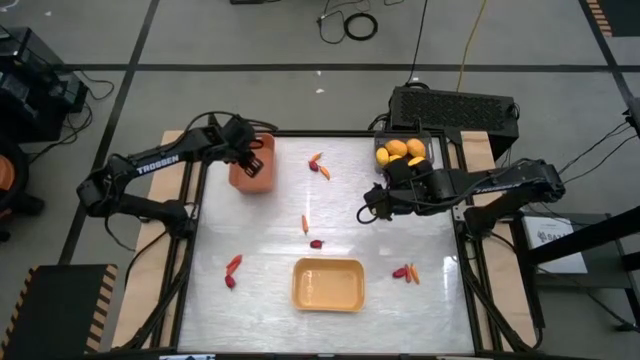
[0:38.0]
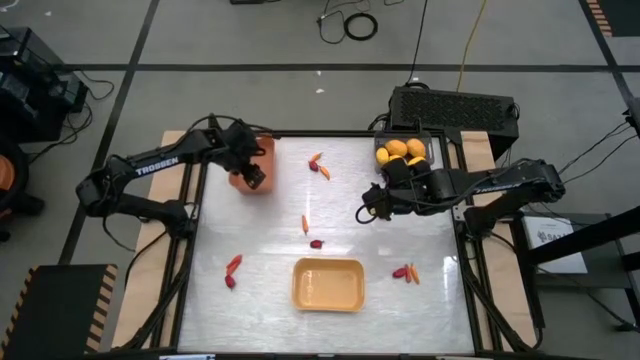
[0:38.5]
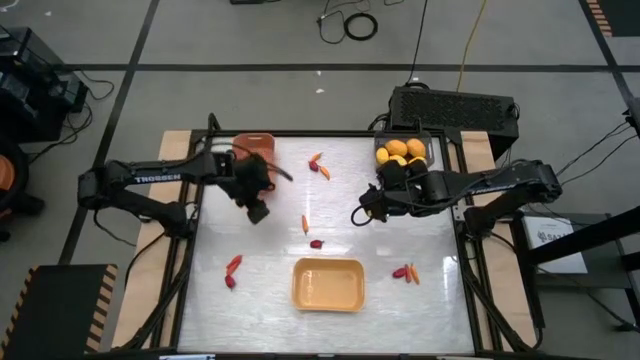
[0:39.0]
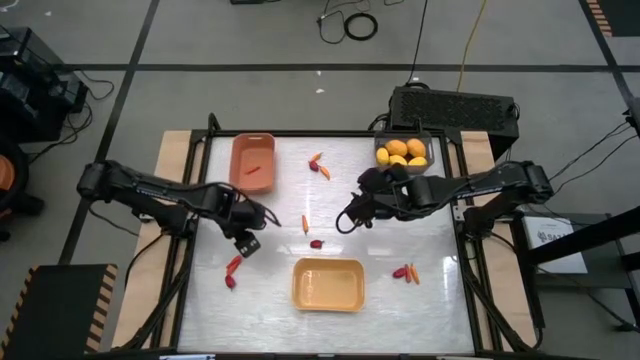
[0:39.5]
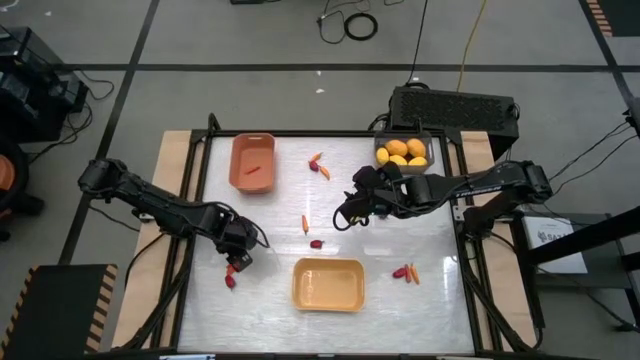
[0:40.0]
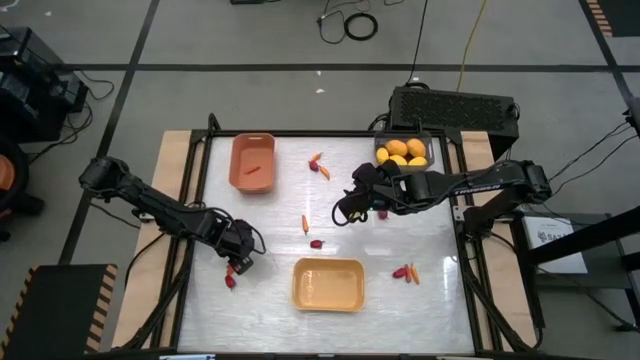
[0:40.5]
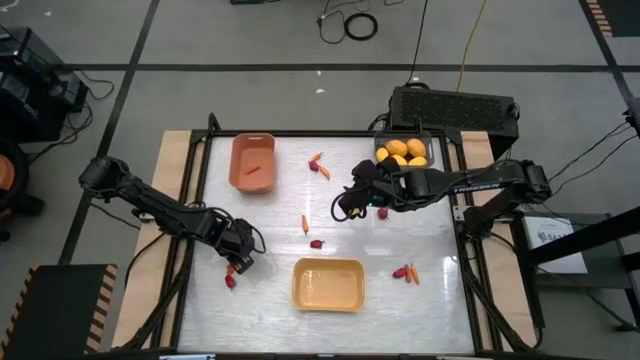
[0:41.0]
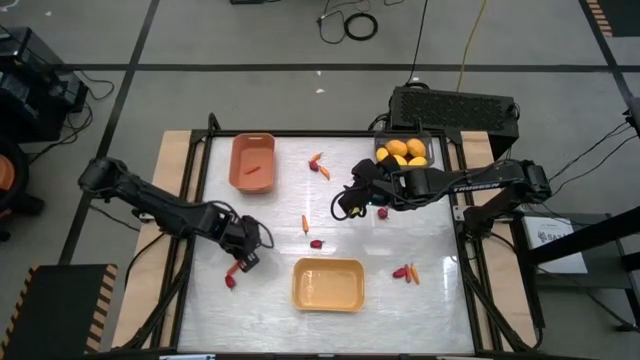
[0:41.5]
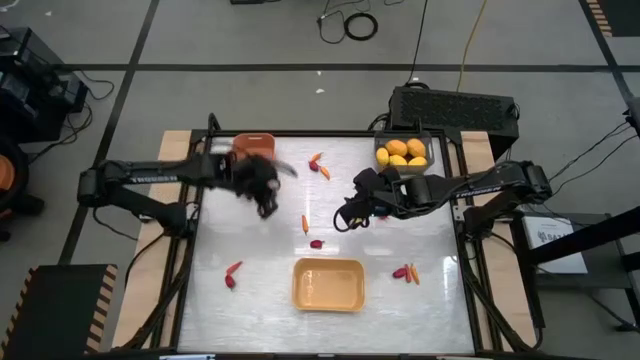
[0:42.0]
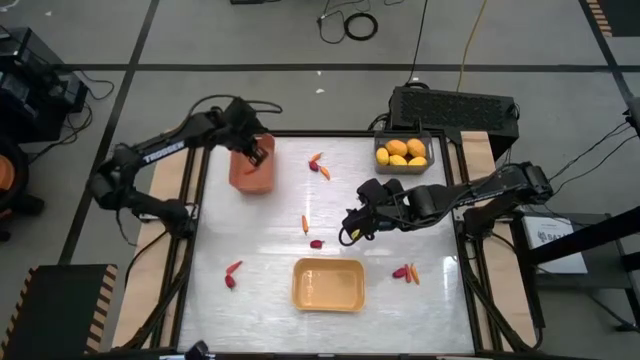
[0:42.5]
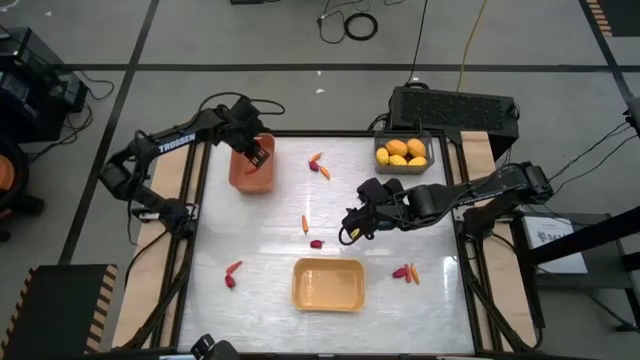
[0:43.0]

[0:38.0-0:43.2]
Task: Sort produce into baskets
Put the red chili into the orange bin

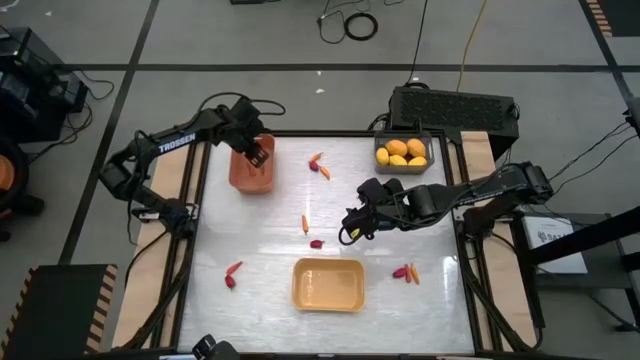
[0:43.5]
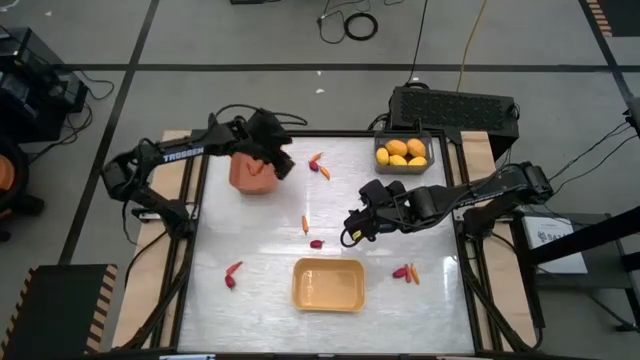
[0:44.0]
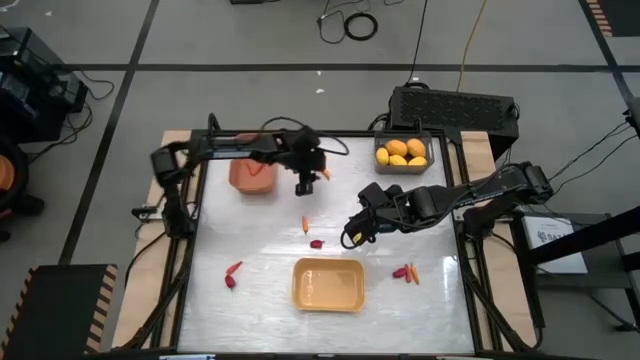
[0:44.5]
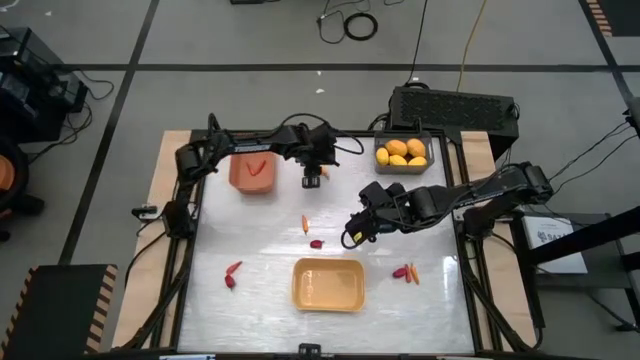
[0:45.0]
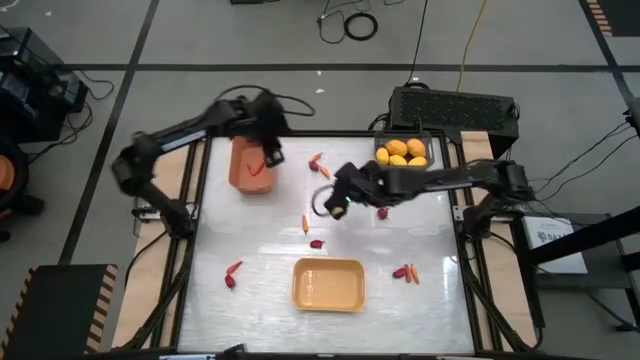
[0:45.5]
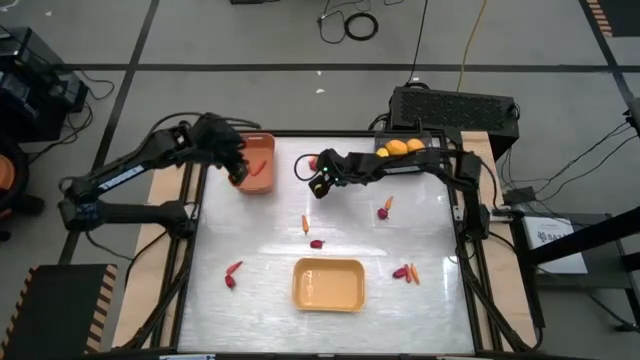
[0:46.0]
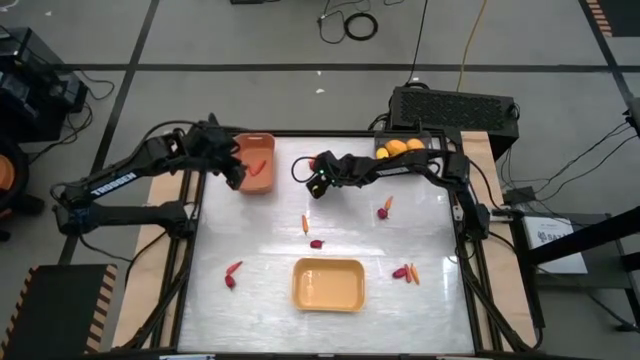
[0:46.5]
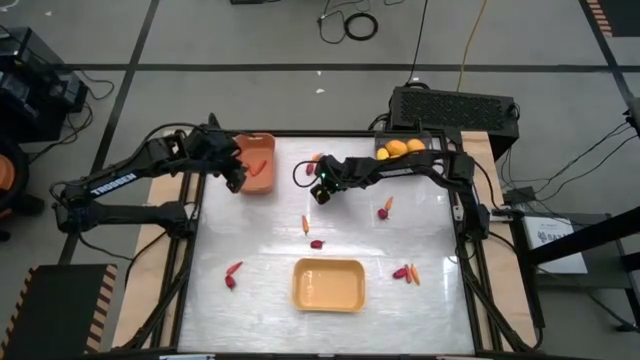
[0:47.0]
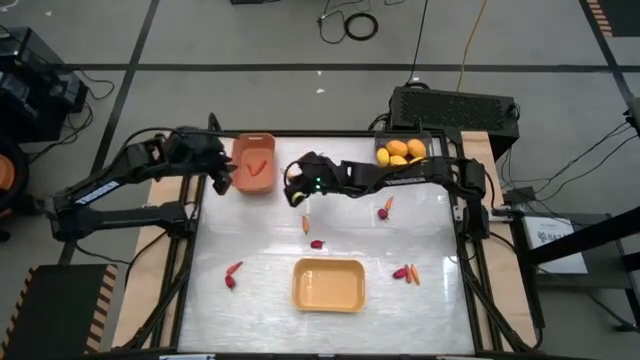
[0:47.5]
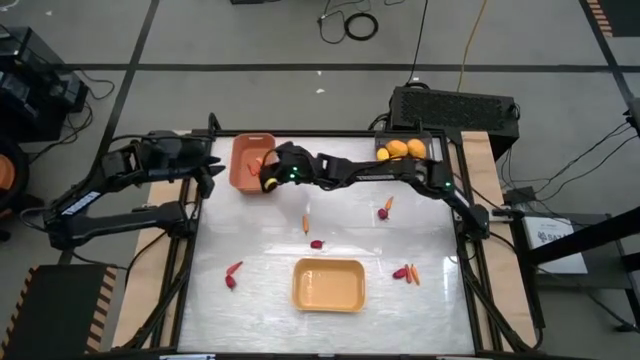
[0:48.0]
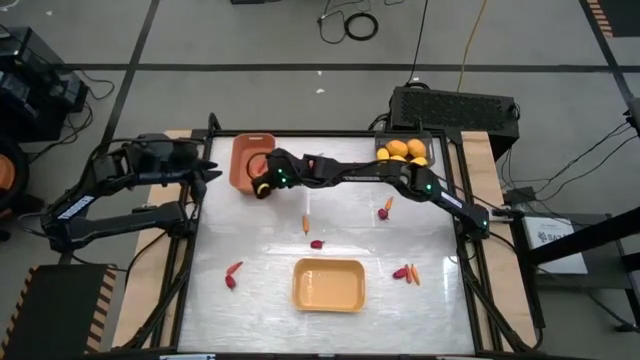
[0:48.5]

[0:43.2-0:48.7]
Put the yellow orange chili into the orange bin

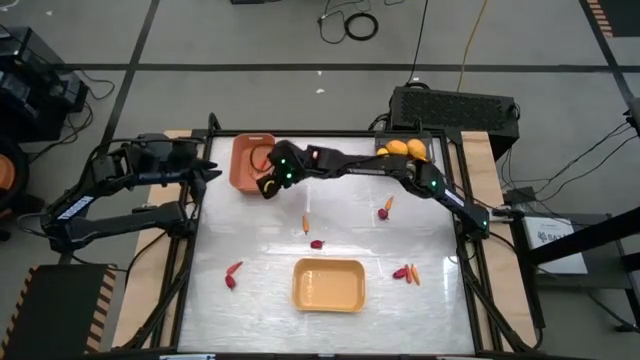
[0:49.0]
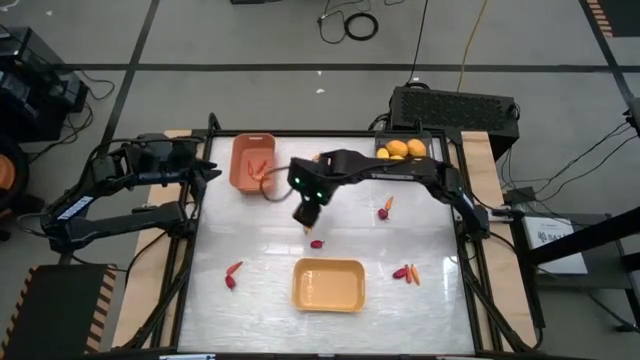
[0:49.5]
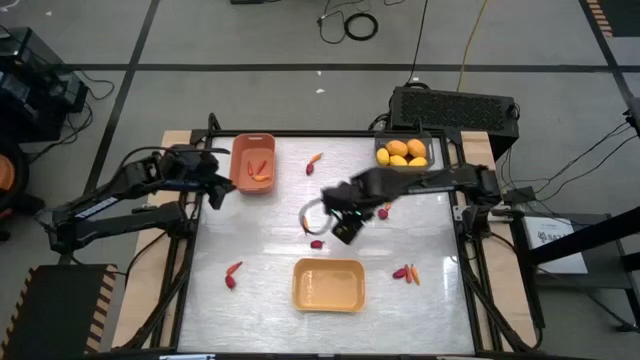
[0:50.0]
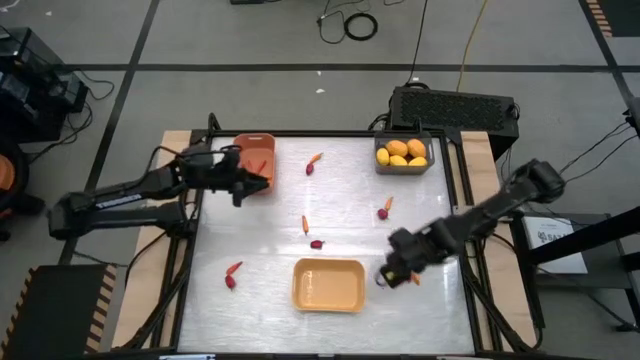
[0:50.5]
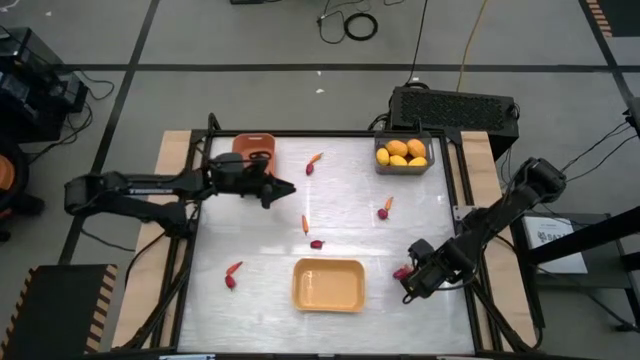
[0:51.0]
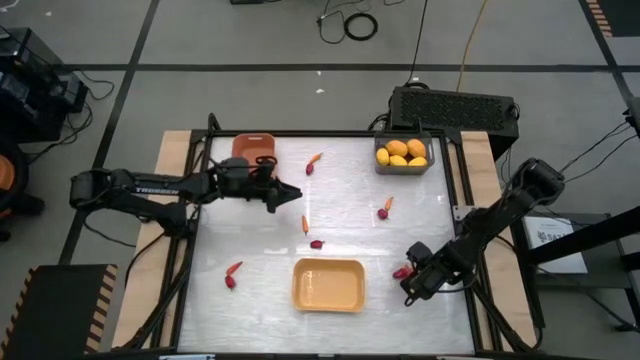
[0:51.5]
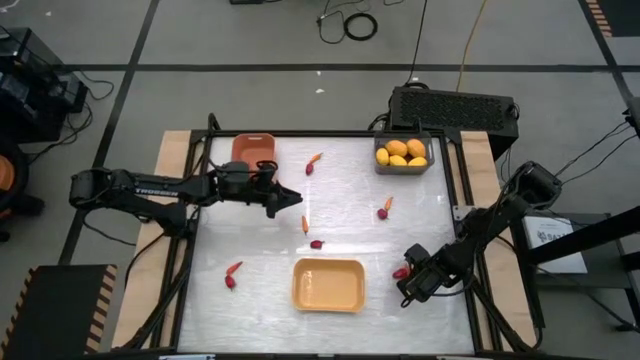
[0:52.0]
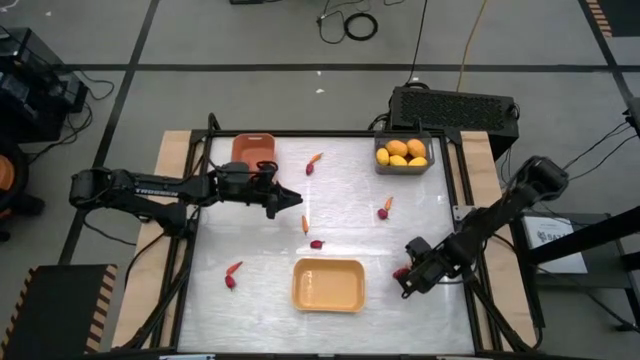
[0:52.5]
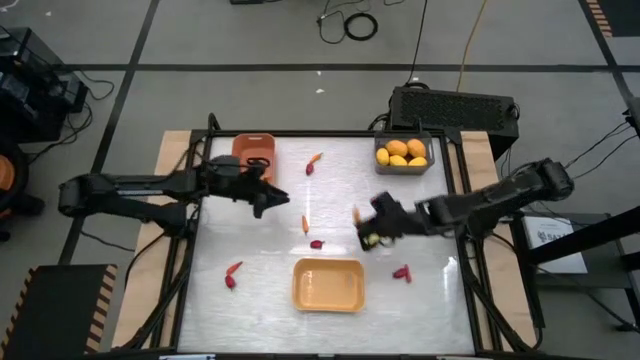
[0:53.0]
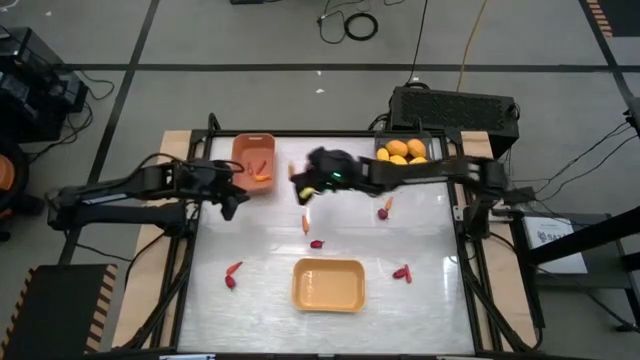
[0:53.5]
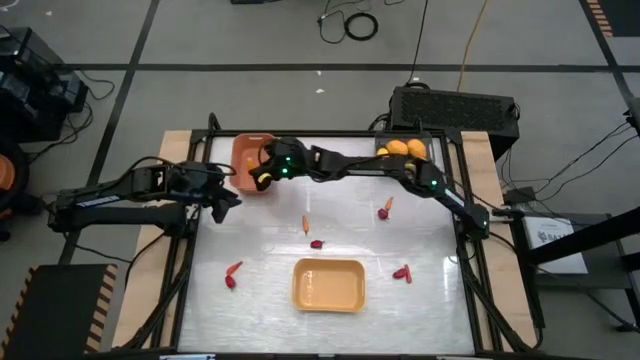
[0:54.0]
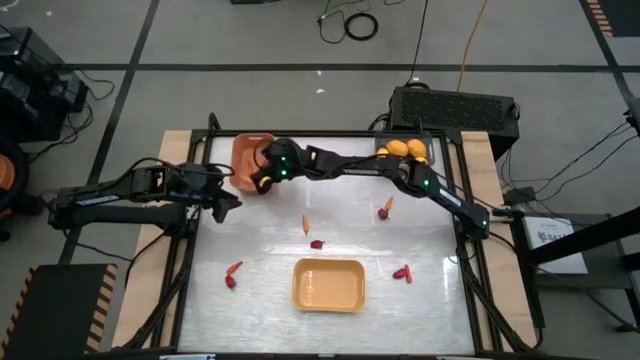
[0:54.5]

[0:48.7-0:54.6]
Put the yellow orange chili into the orange bin

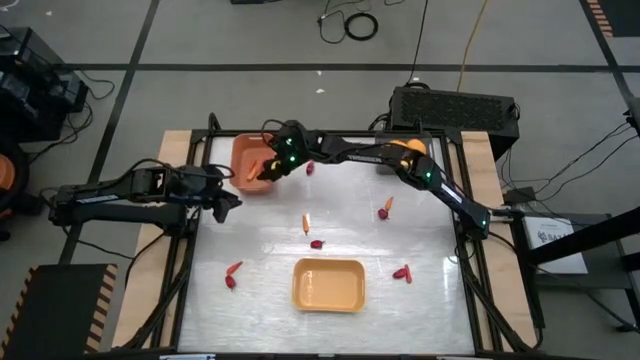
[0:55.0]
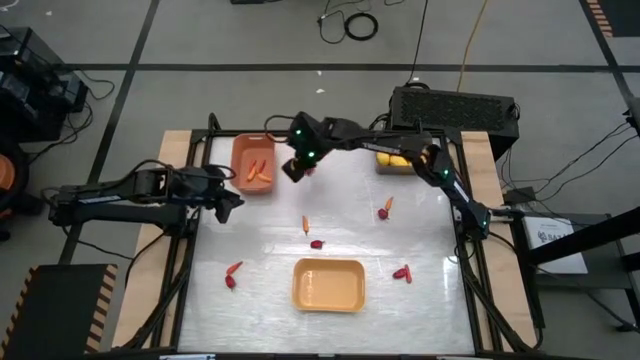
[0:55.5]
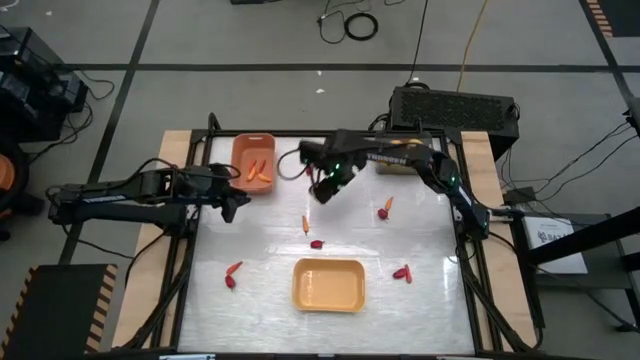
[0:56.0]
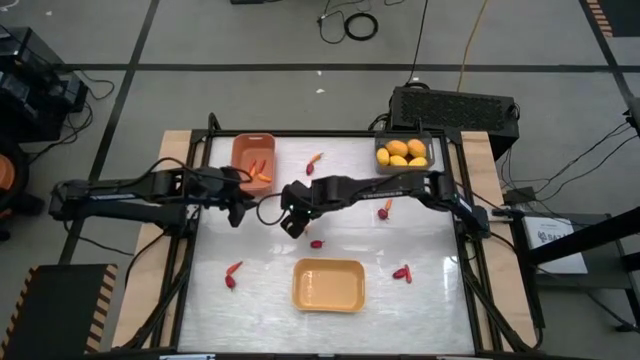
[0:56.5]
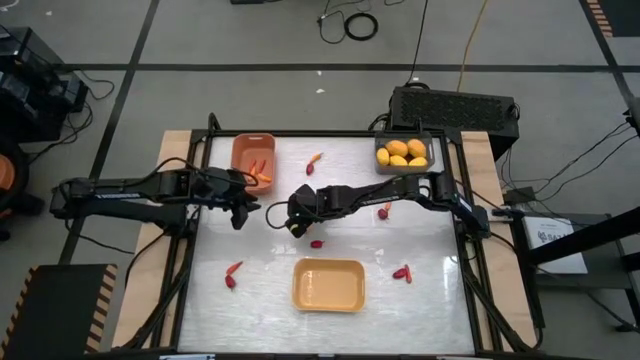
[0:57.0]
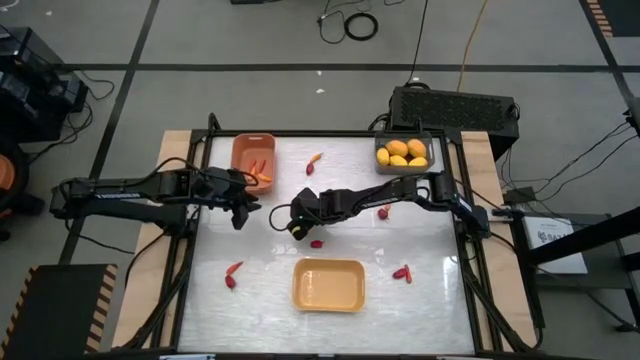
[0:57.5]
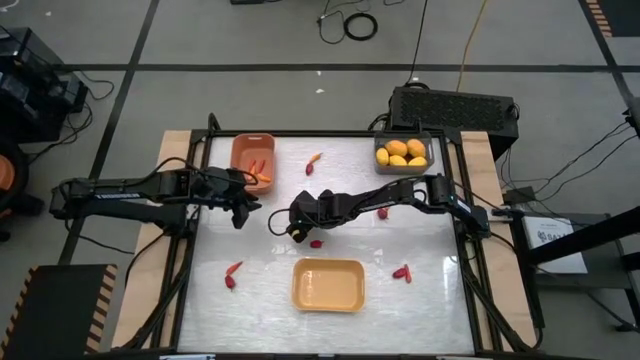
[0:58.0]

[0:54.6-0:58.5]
Put the yellow orange chili into the orange bin

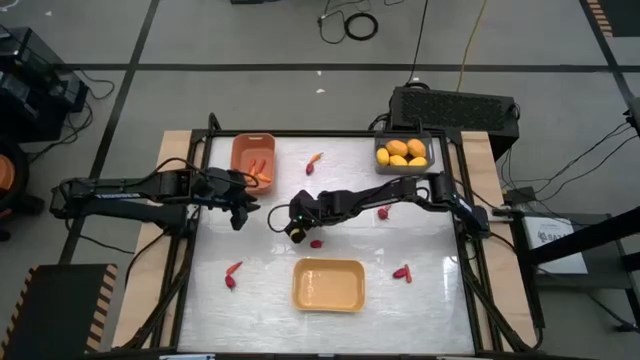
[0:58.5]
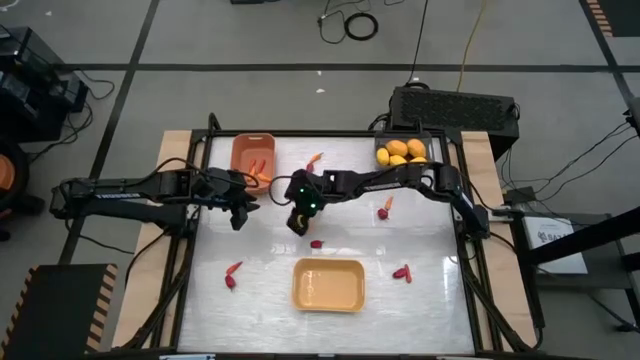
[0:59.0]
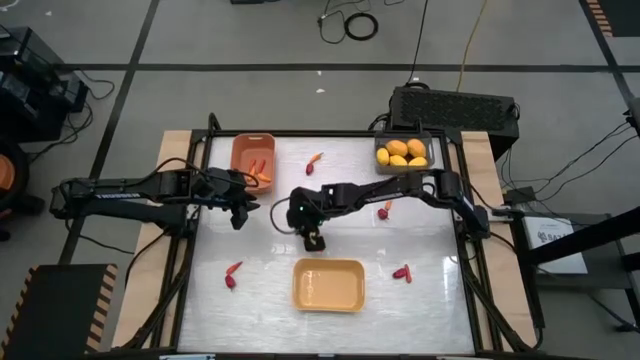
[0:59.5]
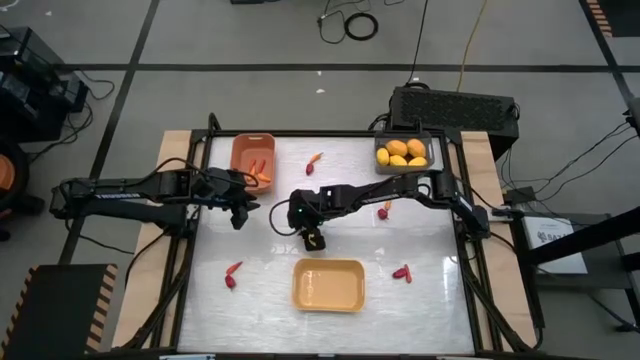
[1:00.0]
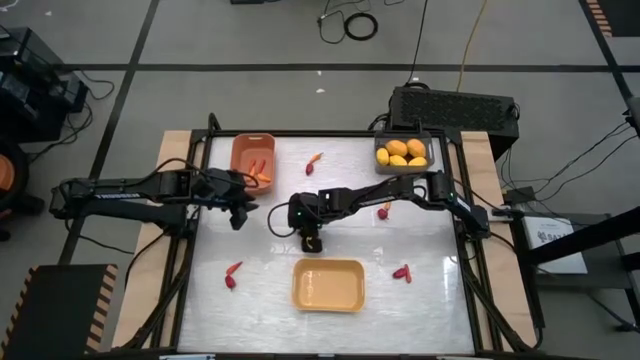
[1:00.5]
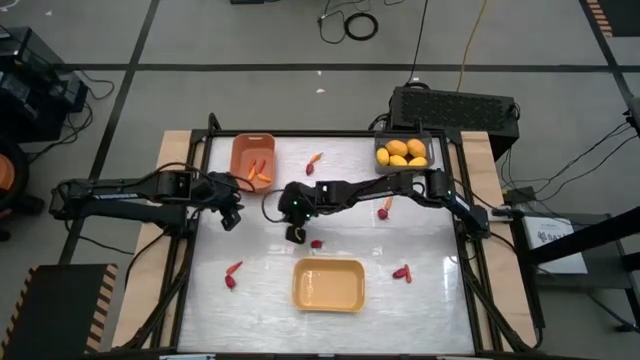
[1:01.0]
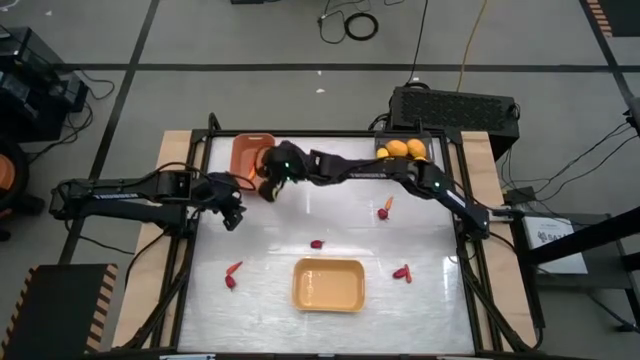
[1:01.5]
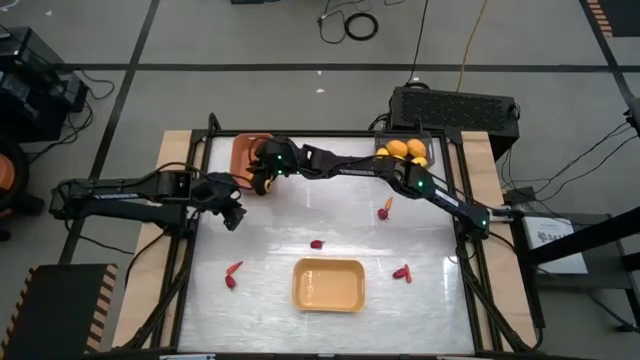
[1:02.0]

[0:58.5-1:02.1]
Put the yellow orange chili into the orange bin
